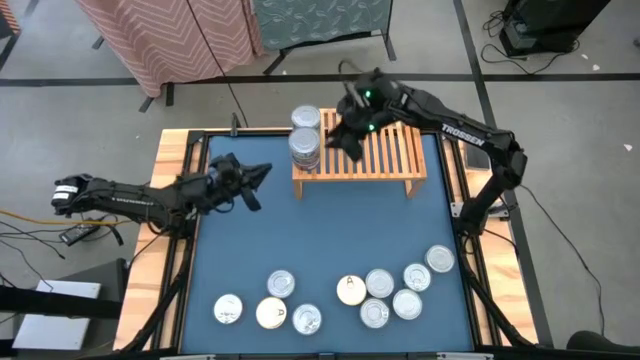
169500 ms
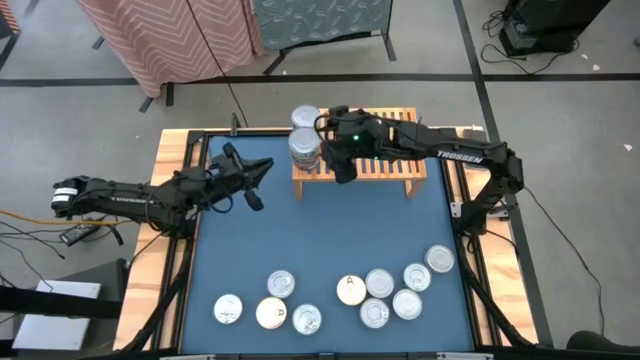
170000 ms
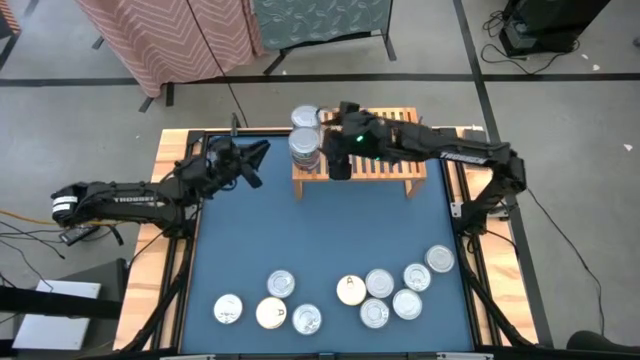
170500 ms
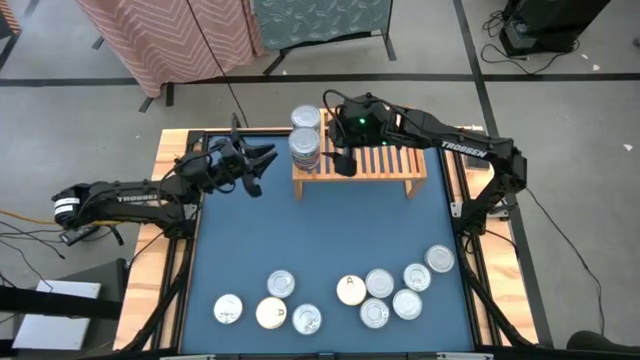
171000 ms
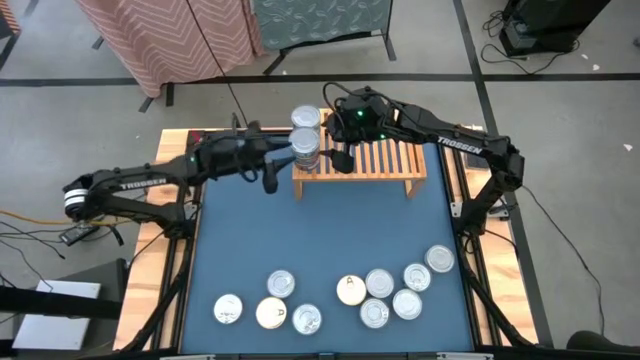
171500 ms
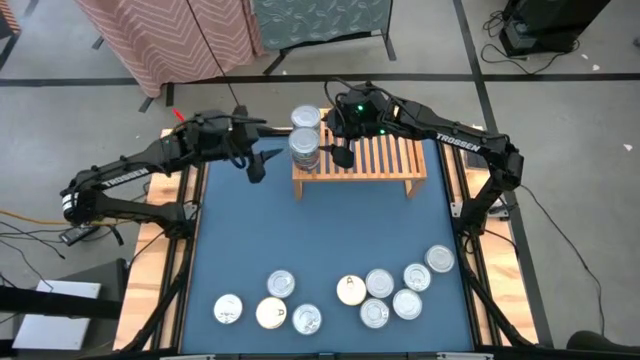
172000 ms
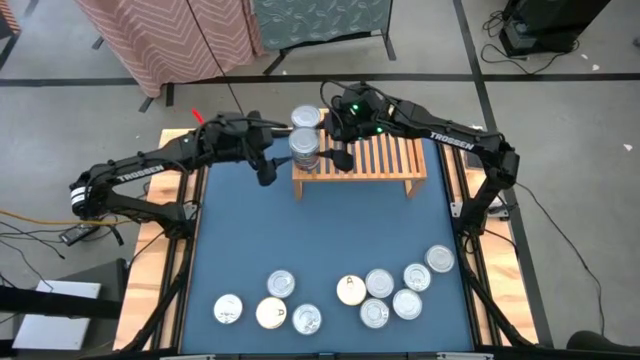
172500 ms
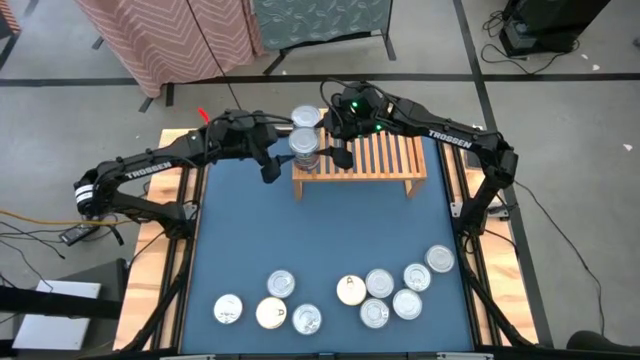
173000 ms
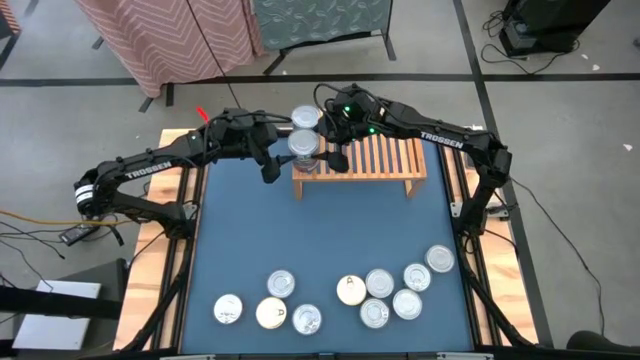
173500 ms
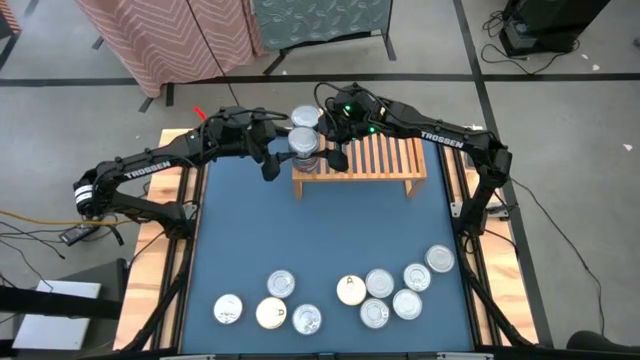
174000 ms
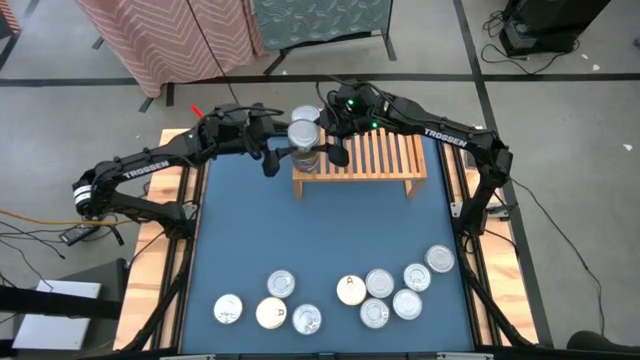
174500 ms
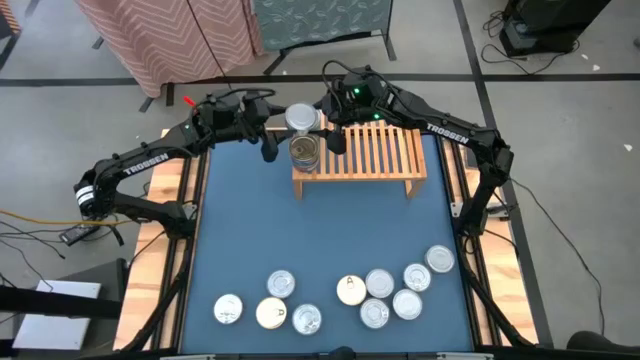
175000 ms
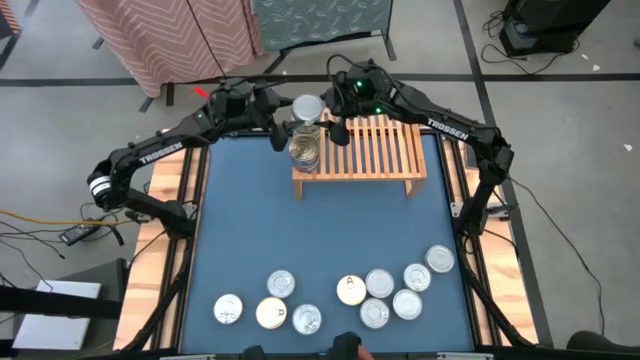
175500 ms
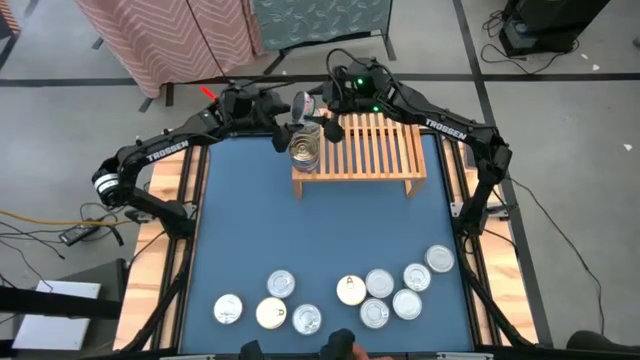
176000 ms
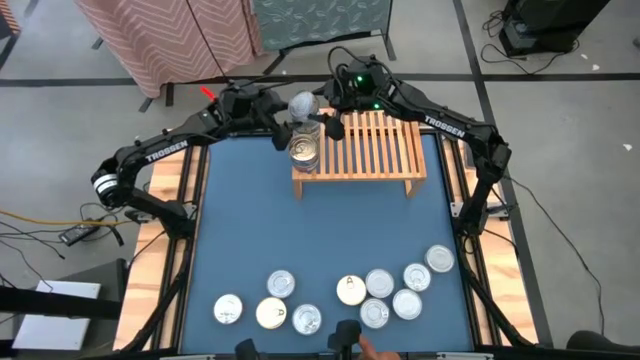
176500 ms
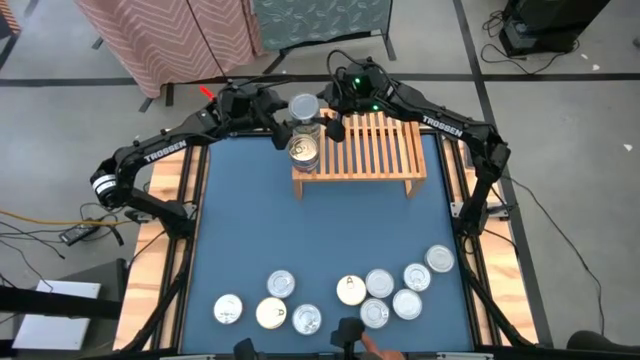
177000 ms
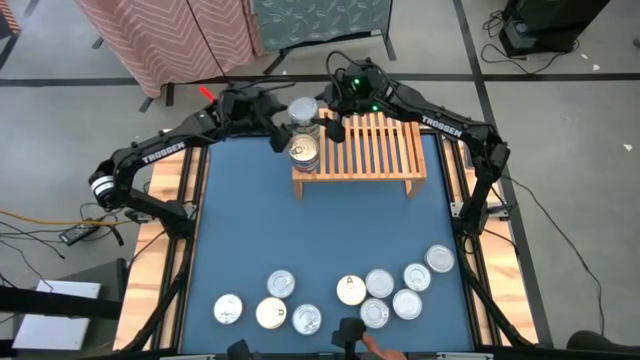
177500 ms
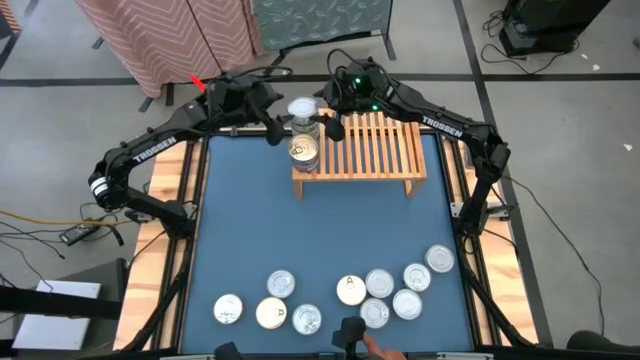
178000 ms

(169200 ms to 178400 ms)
Task: Stack canned seafood by type on shelf
Stack the green tuna can on top of the other green tuna cans on the shelf

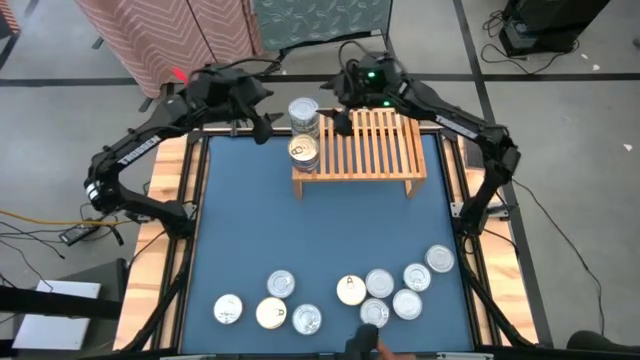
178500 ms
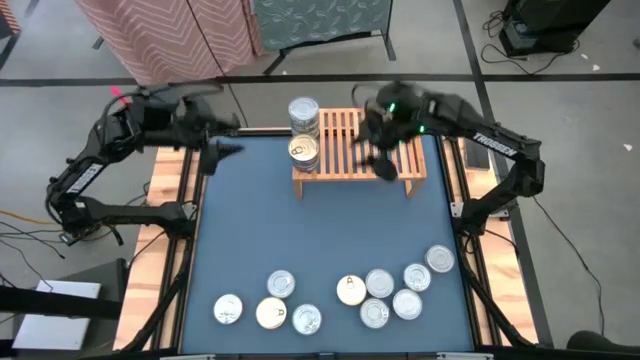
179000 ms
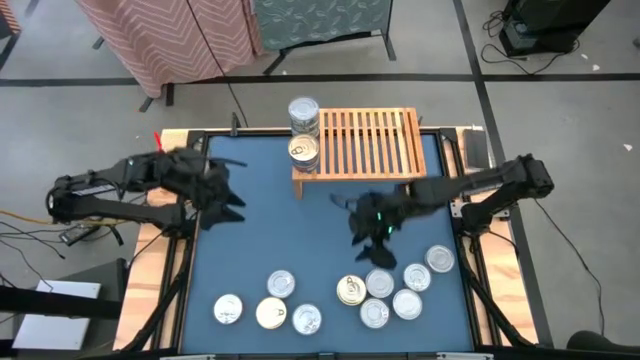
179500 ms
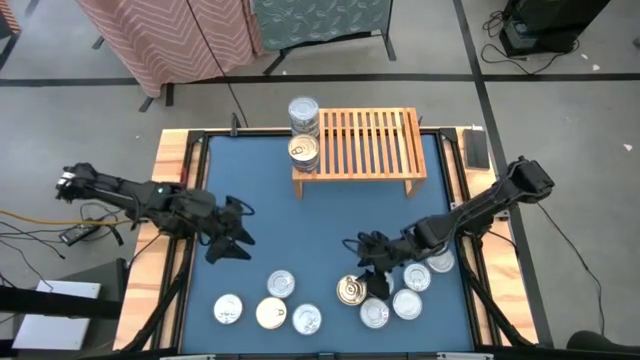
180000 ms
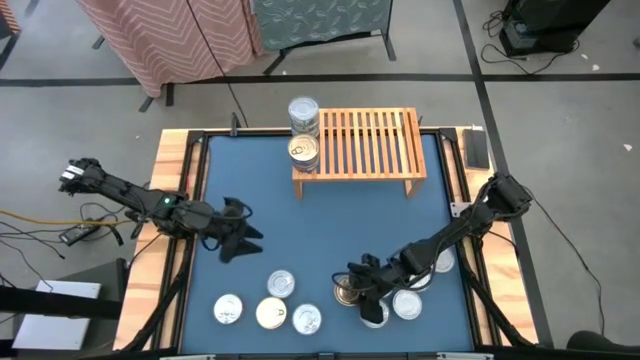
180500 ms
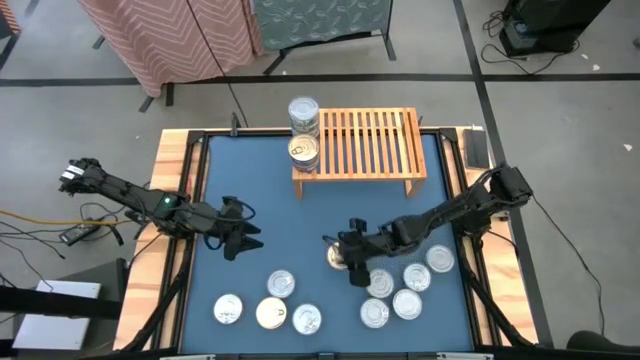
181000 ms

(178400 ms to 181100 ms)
Move the blue tuna cans to the center of the table

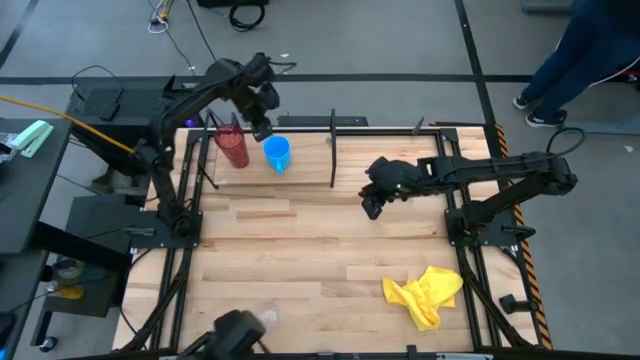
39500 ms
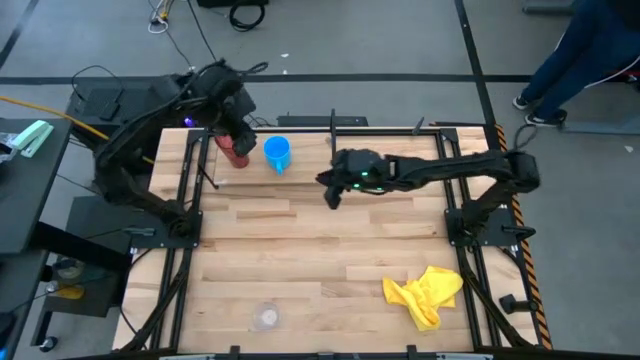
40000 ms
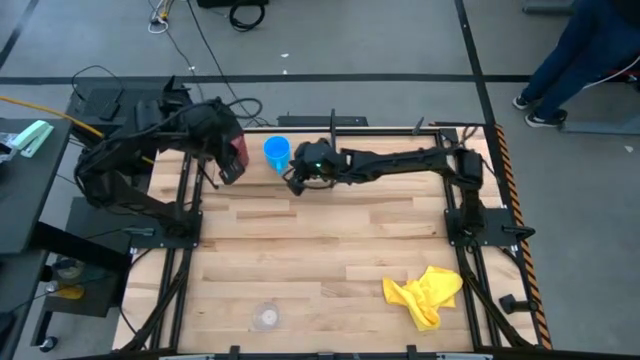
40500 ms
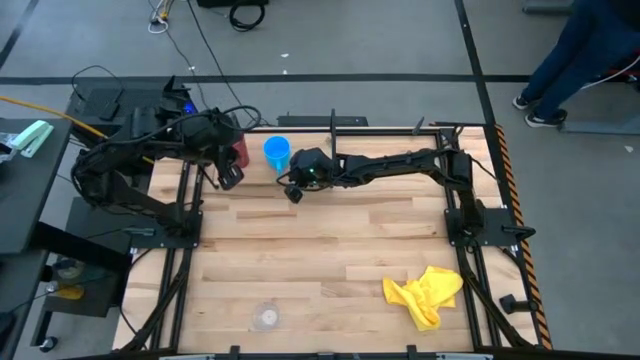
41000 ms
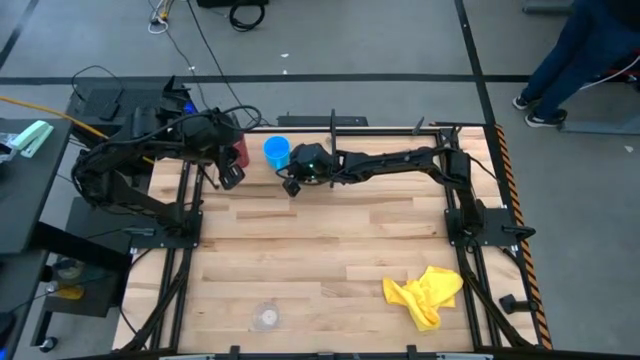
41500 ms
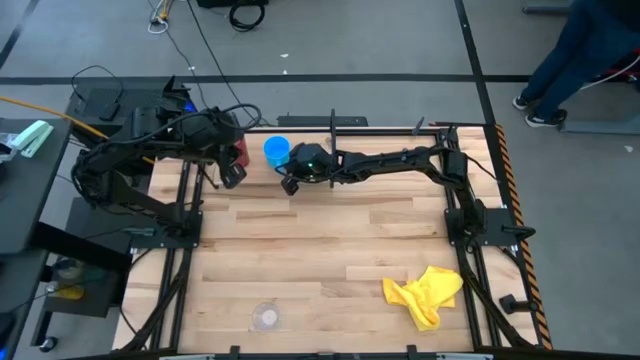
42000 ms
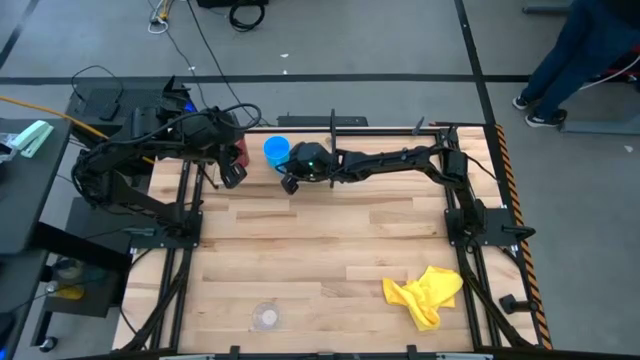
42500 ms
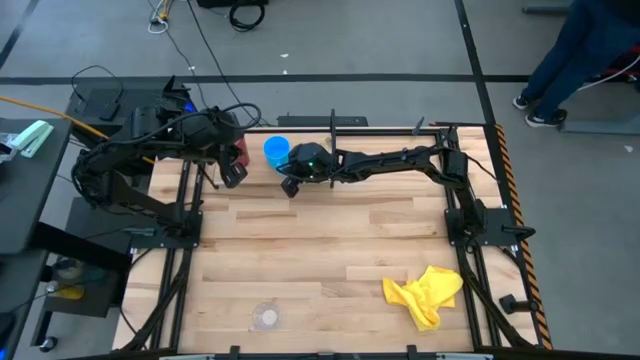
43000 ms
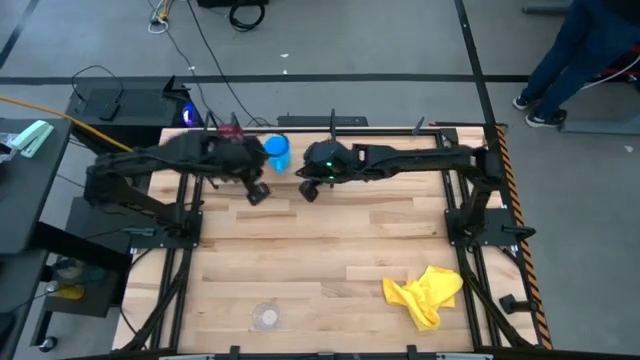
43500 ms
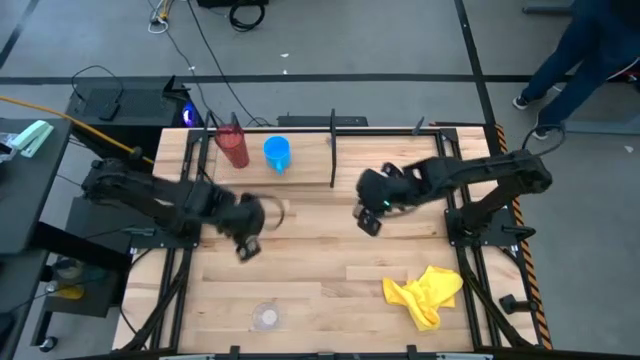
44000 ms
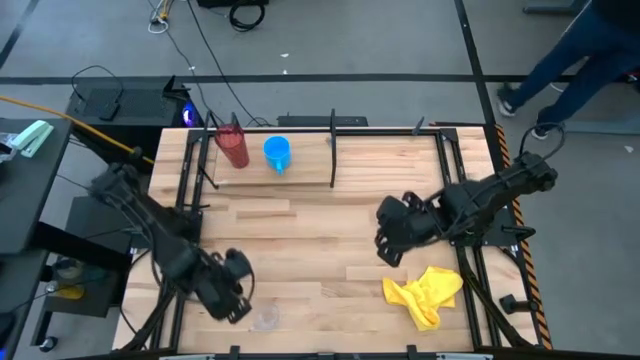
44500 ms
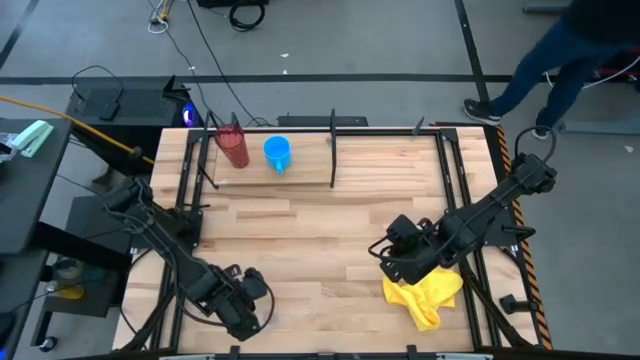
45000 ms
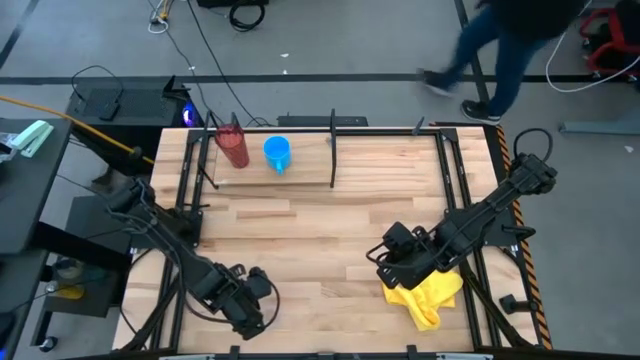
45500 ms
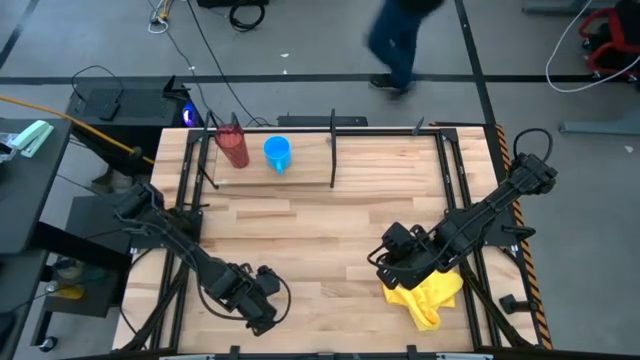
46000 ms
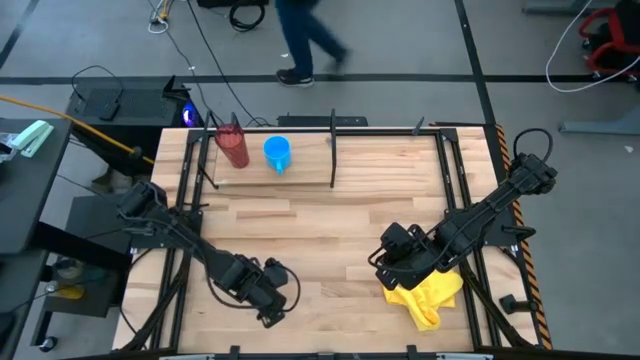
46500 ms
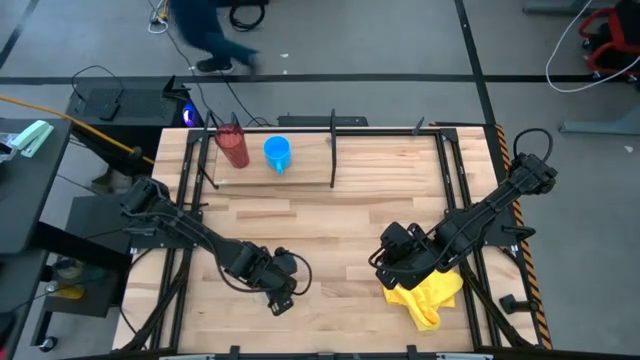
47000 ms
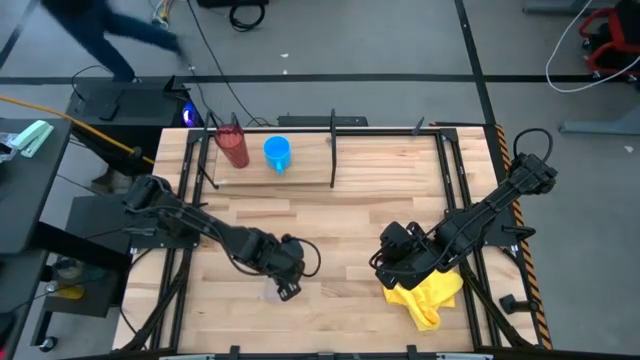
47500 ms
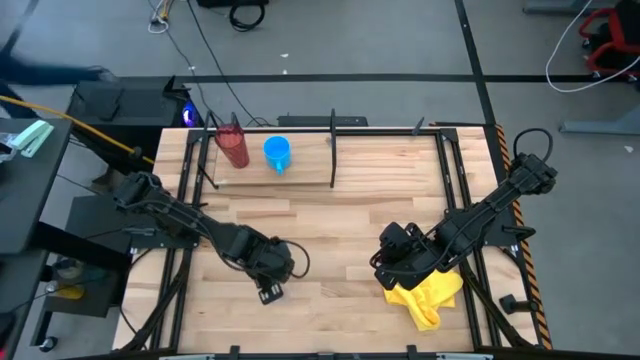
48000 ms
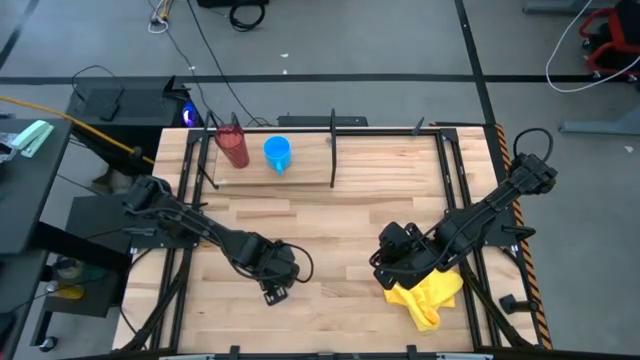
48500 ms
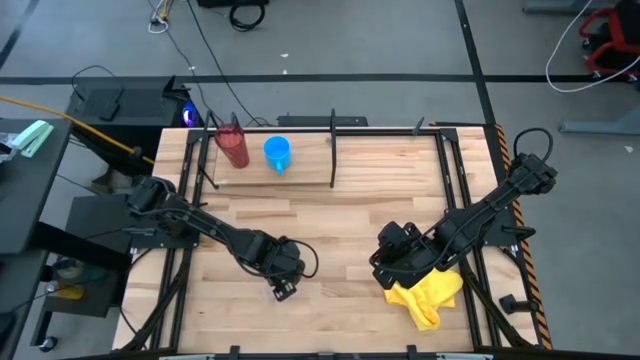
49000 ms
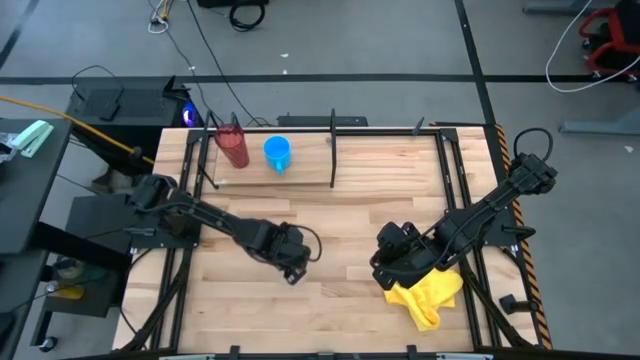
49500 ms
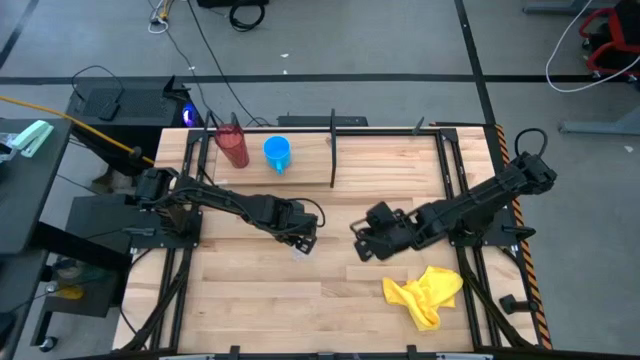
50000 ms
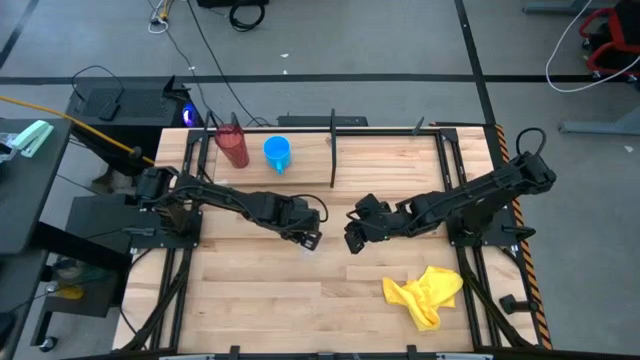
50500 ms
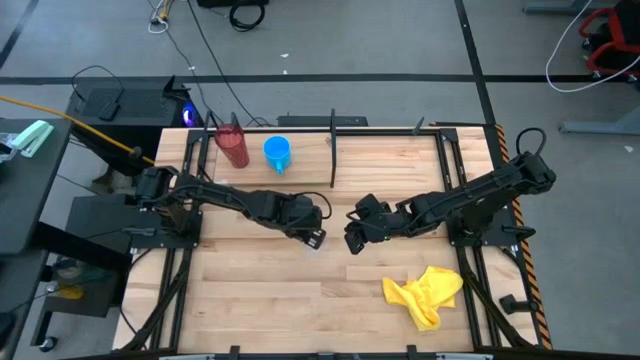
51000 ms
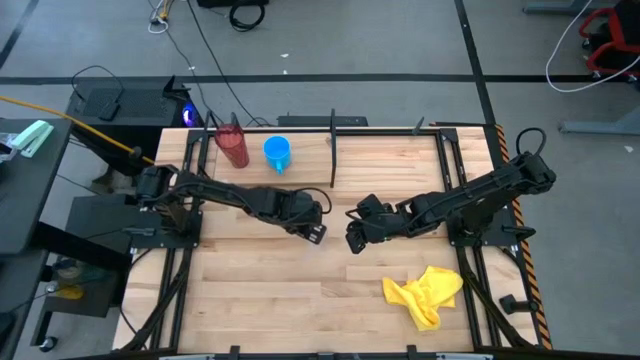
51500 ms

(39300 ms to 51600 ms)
Task: Stack small to large cups/mugs on shelf
Move the transparent mug to the middle of the table
